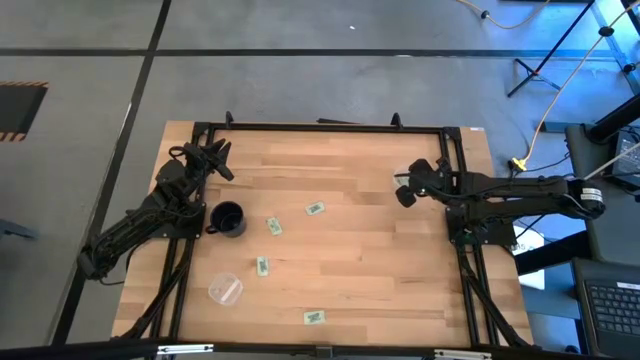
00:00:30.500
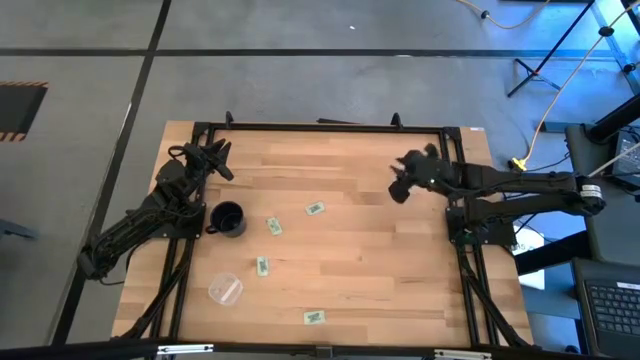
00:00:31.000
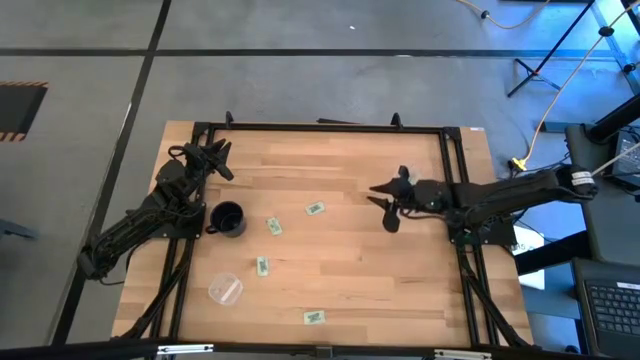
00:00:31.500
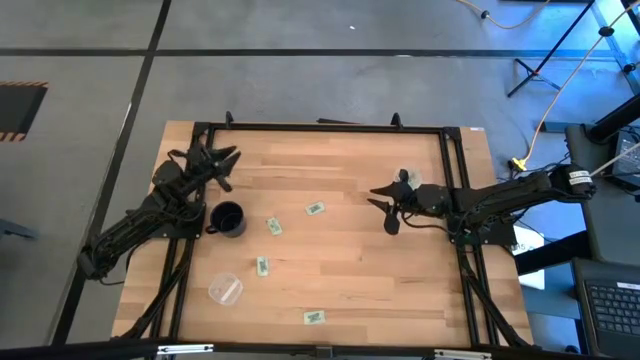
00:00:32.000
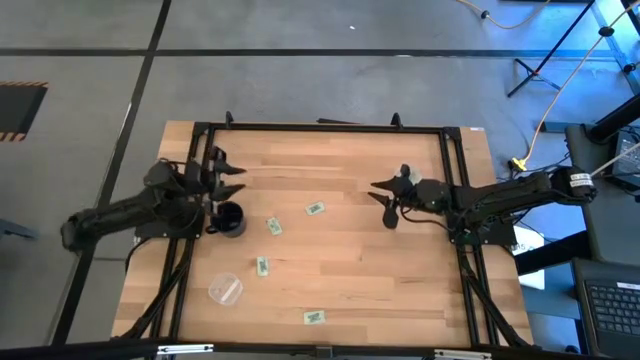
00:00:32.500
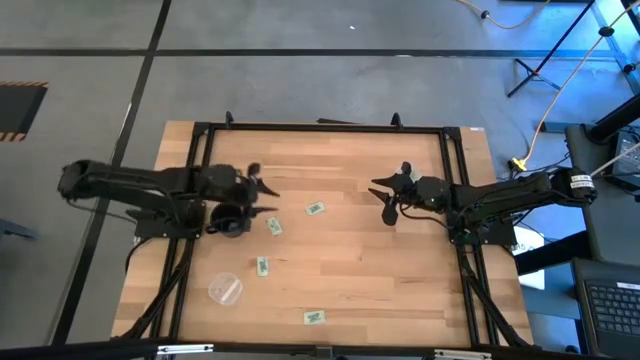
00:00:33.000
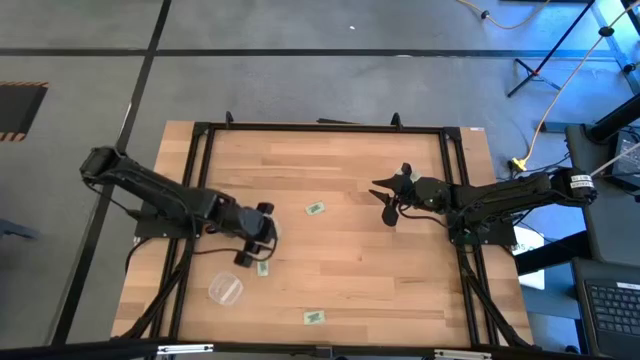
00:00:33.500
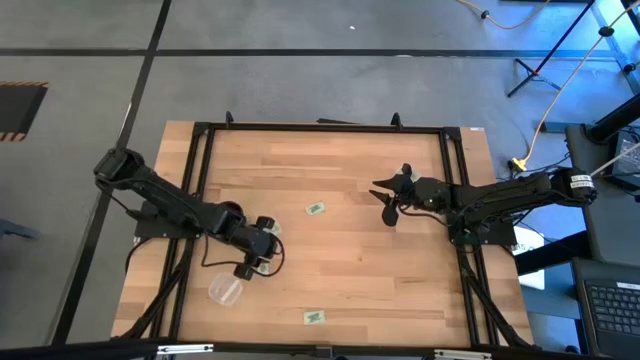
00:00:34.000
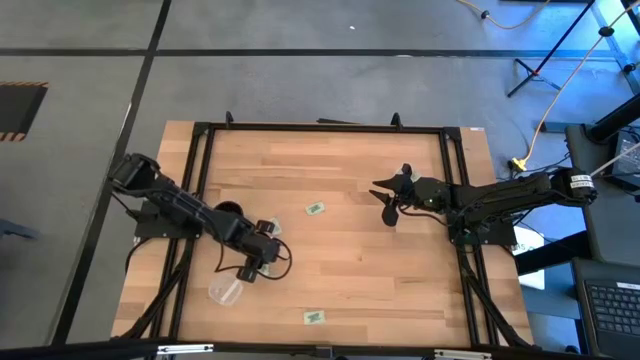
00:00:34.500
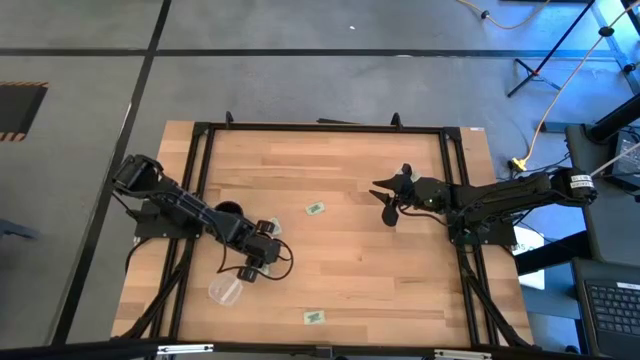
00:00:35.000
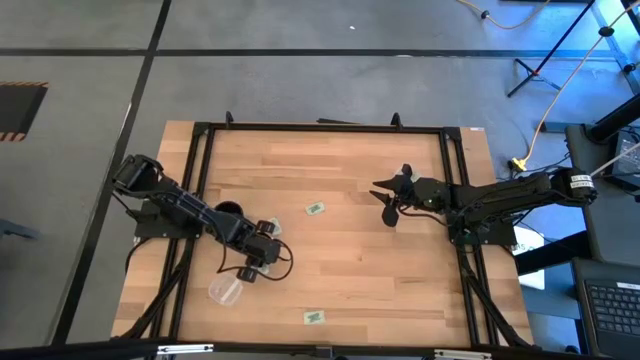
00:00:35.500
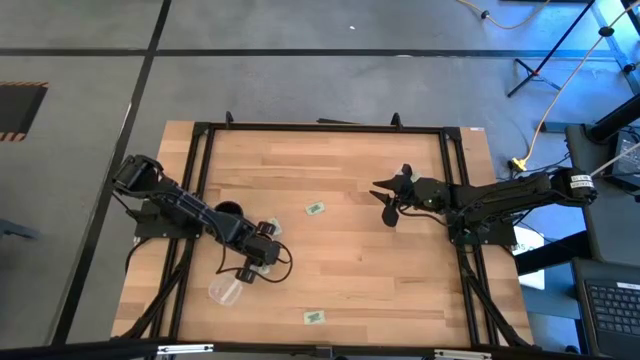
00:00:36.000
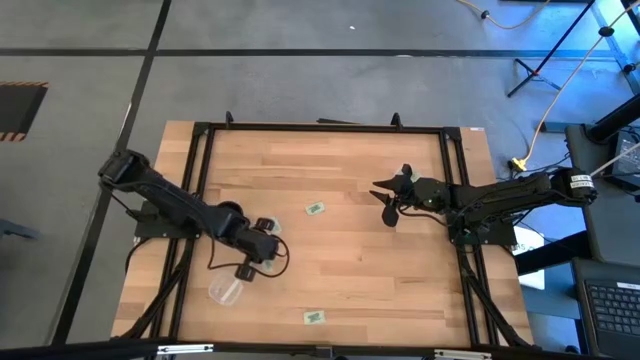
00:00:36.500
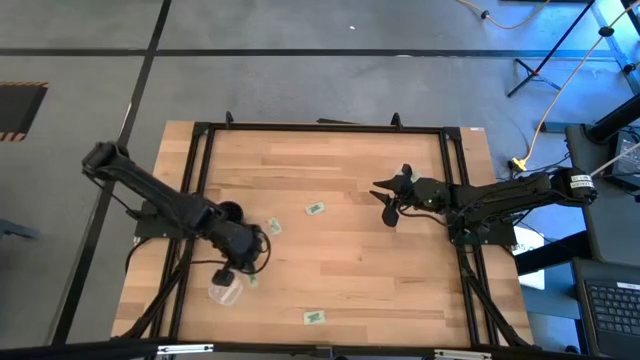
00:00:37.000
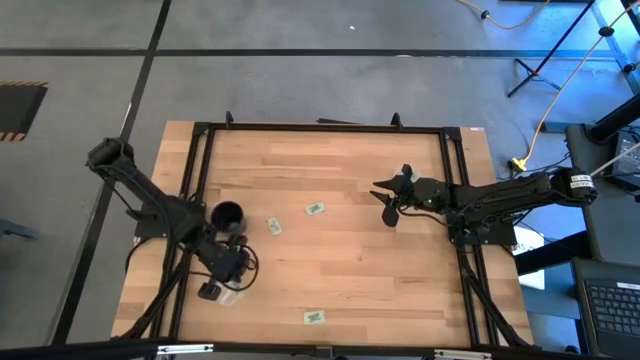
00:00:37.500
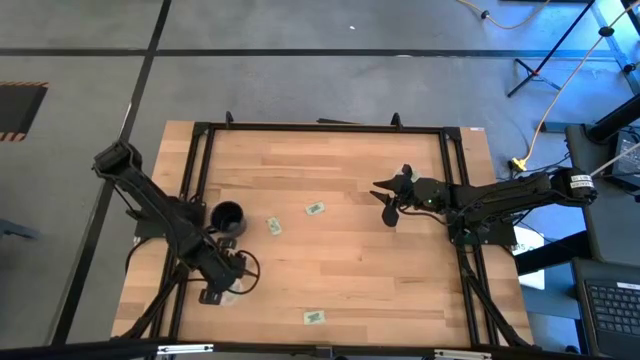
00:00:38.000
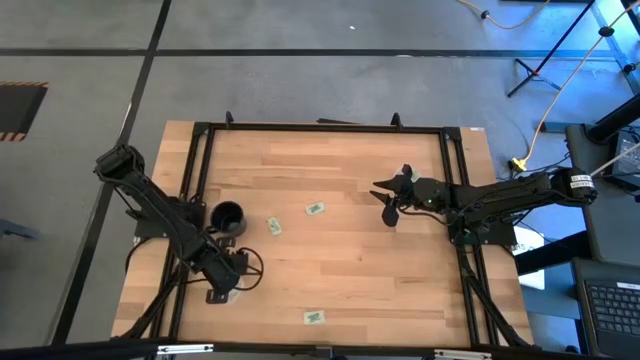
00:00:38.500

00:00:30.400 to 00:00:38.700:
Task: Pick and place items into bin
Put the light green stevia packet into the bottom transparent bin

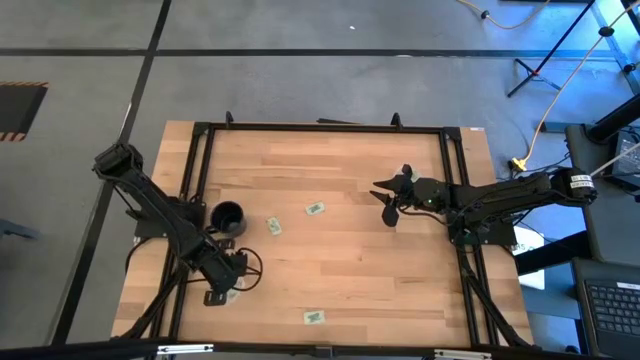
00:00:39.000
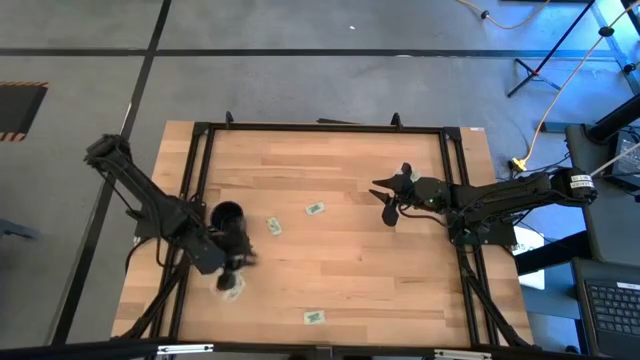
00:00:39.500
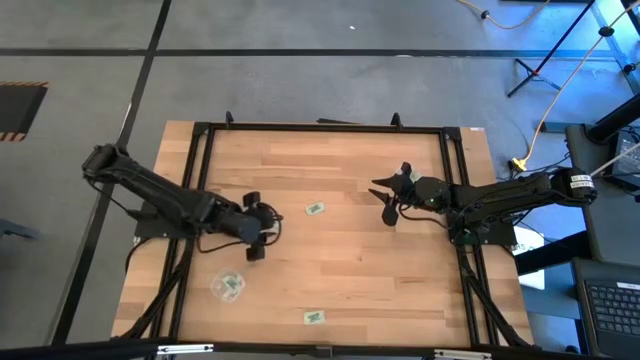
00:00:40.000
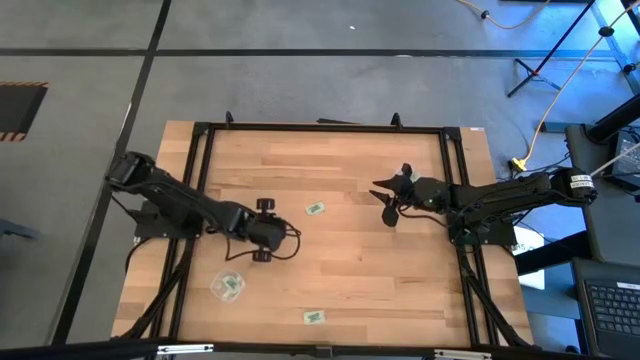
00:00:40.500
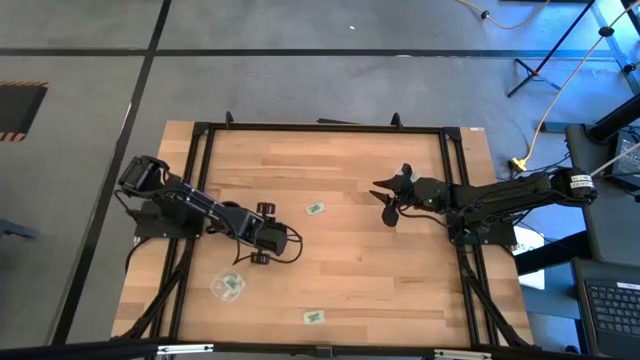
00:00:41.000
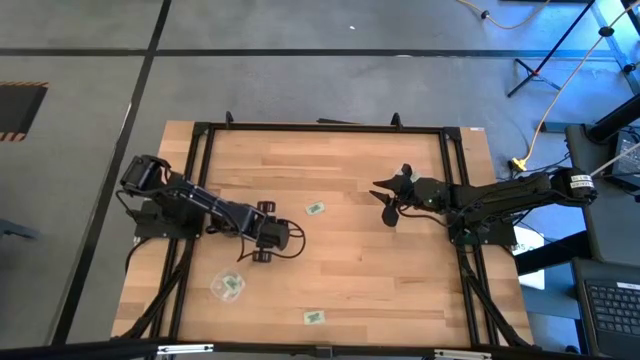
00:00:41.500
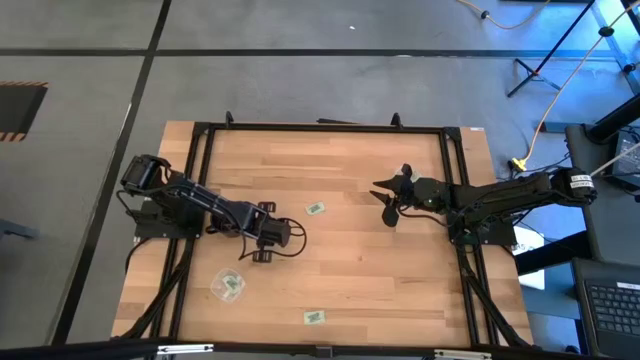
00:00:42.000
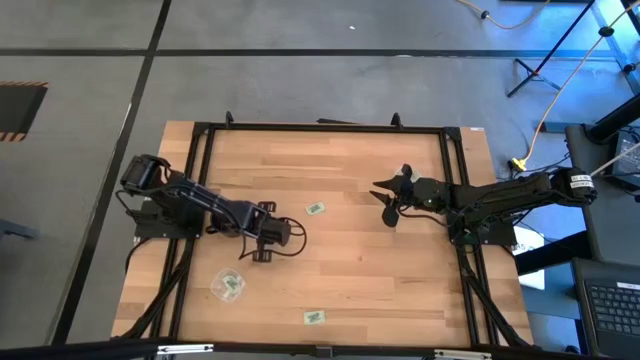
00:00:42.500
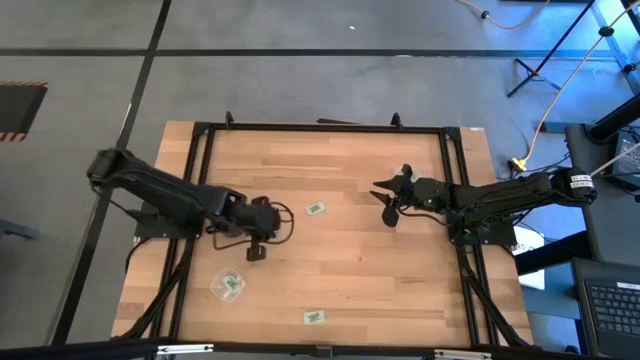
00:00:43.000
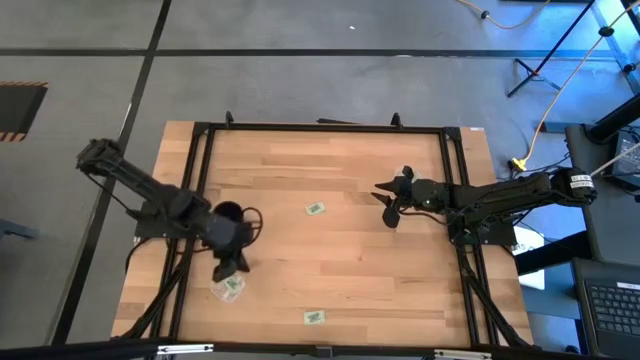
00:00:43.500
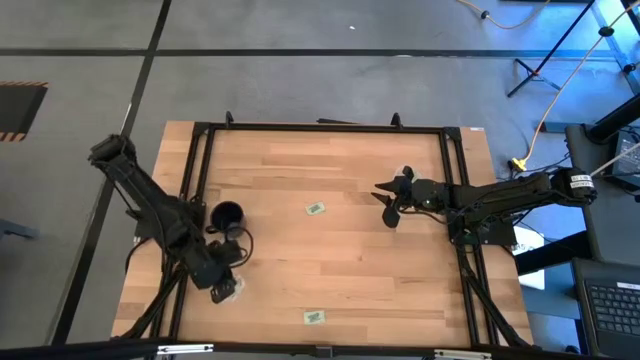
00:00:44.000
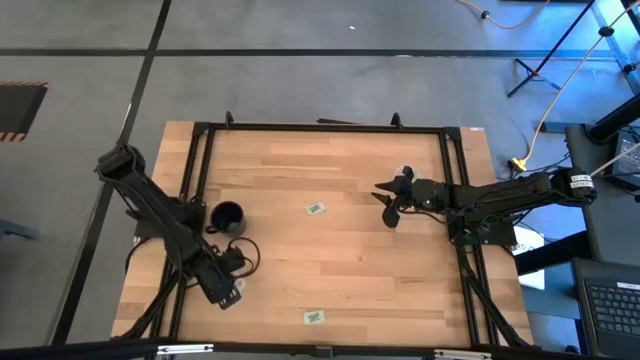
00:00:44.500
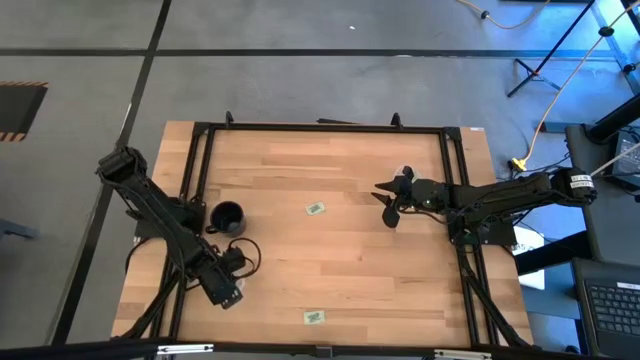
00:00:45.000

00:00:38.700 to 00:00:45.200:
Put the light green stevia packet into the bottom transparent bin

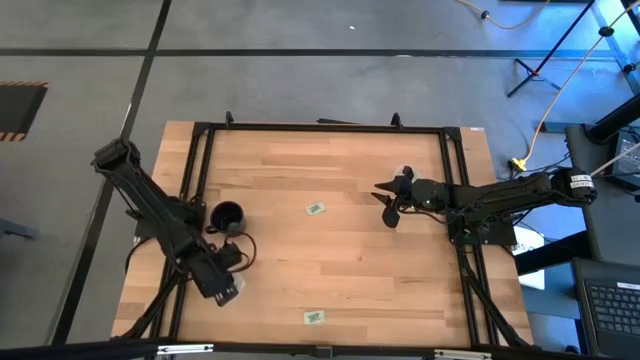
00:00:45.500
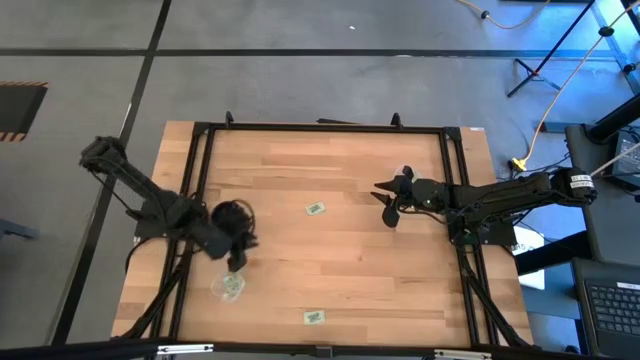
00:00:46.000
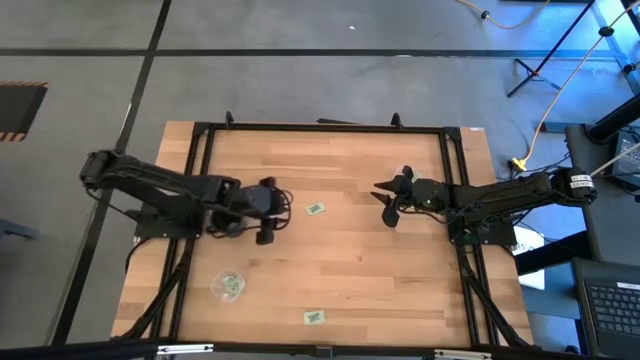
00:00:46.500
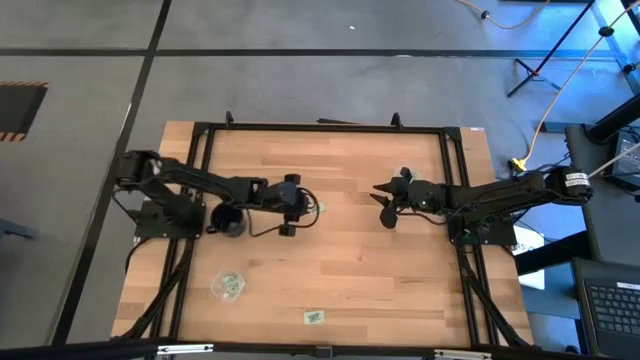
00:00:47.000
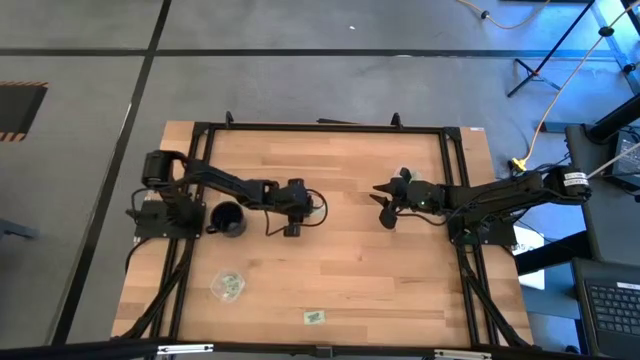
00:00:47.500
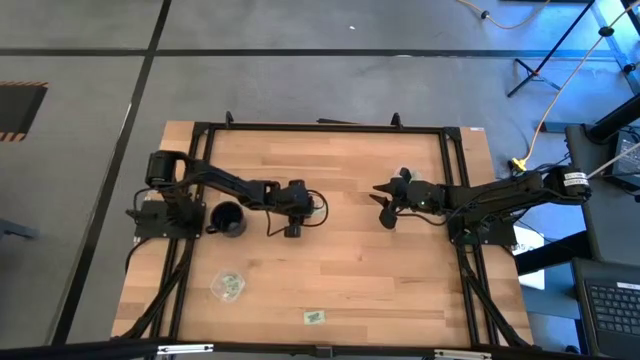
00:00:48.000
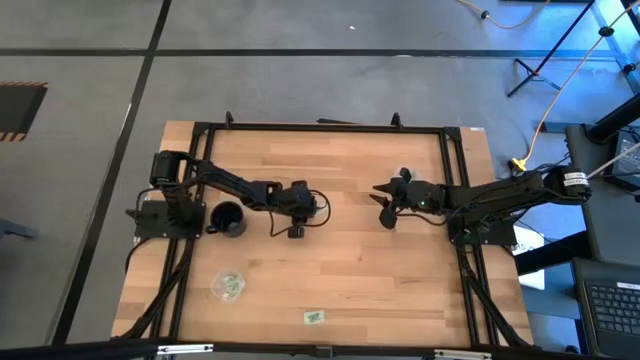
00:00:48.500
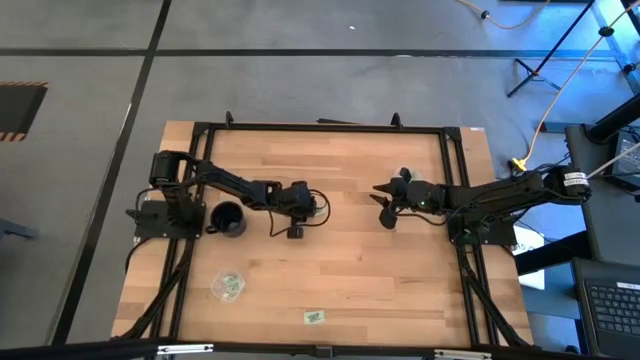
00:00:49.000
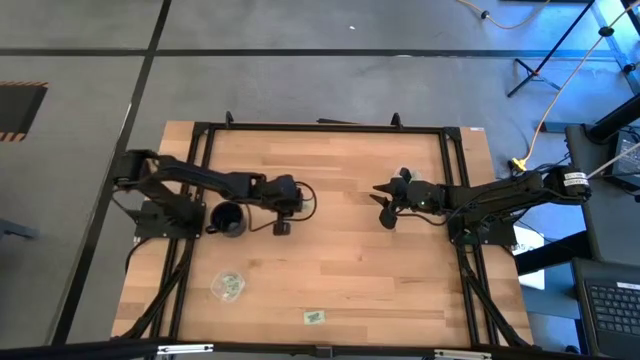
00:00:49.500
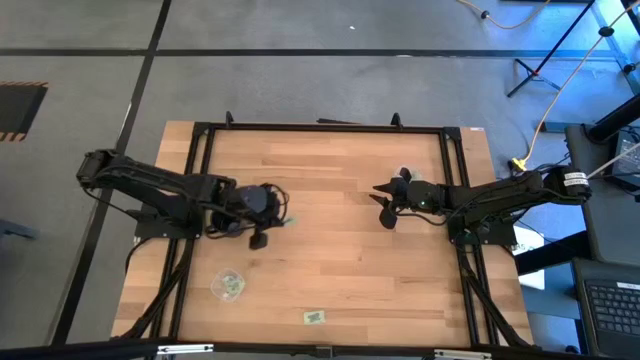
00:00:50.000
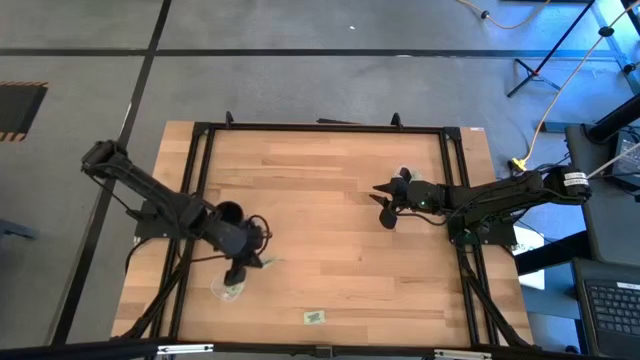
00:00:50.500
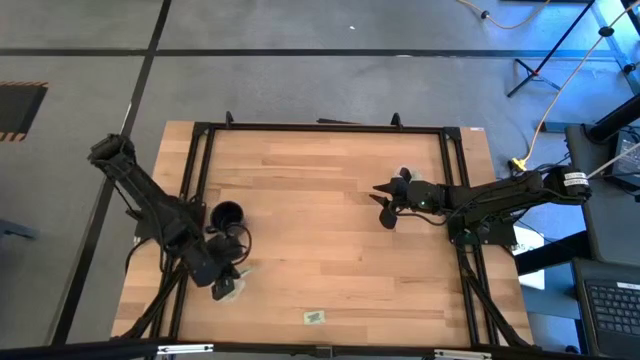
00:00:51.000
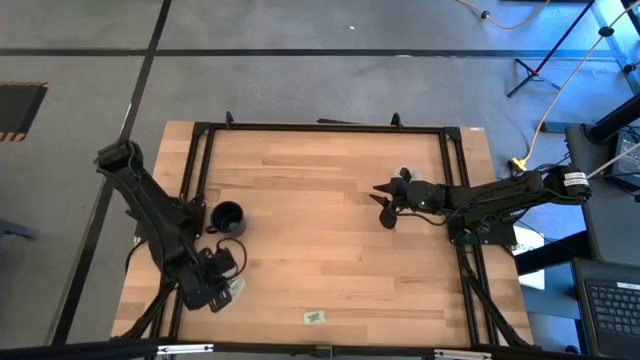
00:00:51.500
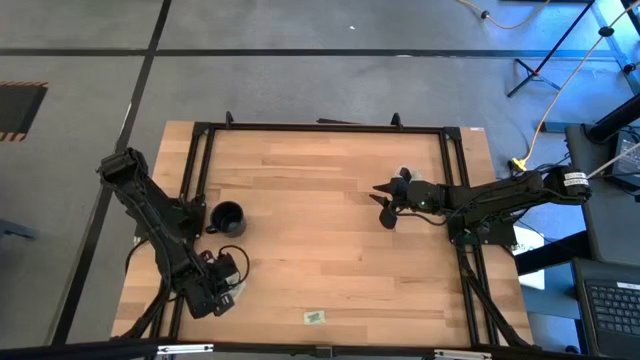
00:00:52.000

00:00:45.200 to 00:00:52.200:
Put the light green stevia packet into the bottom transparent bin
